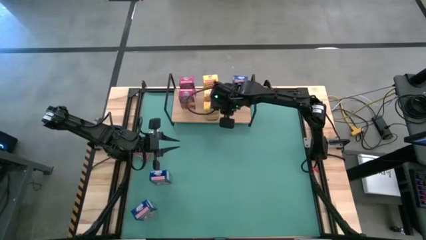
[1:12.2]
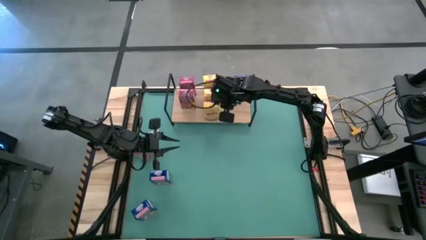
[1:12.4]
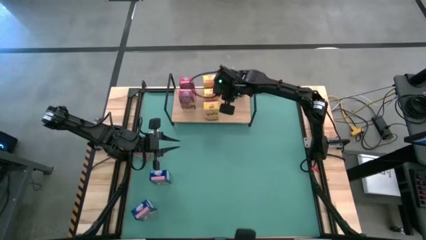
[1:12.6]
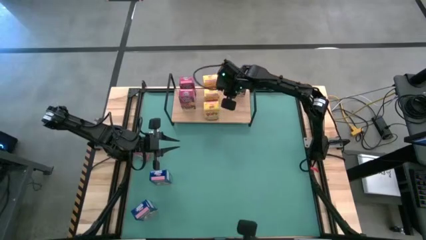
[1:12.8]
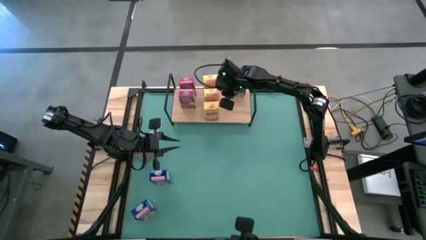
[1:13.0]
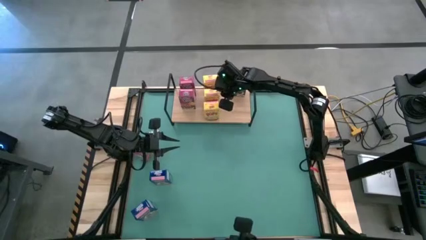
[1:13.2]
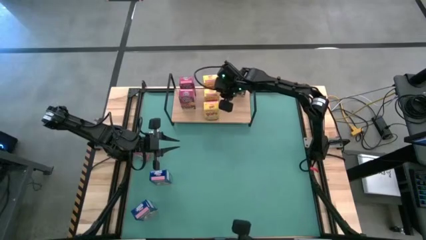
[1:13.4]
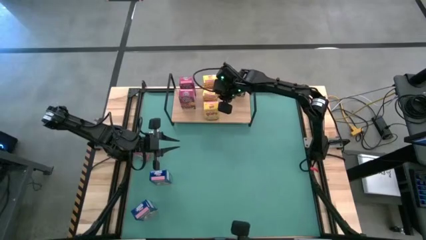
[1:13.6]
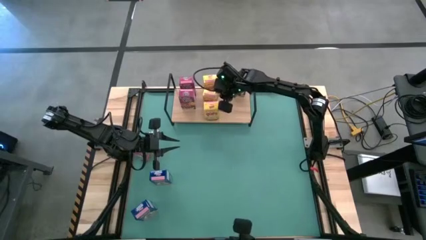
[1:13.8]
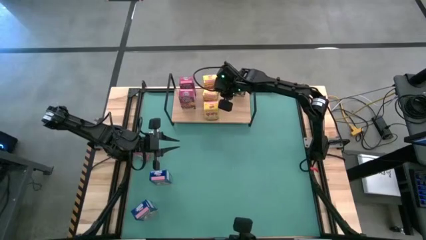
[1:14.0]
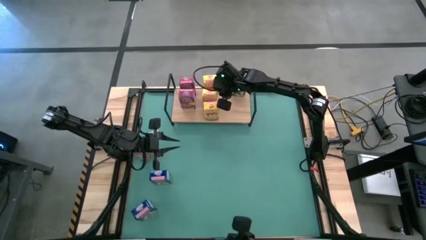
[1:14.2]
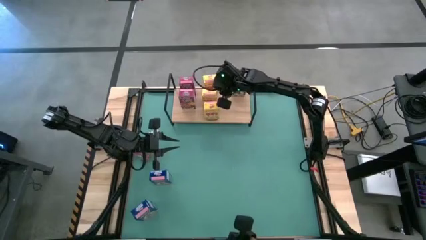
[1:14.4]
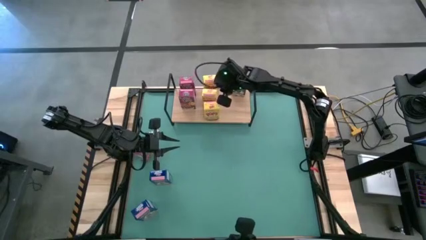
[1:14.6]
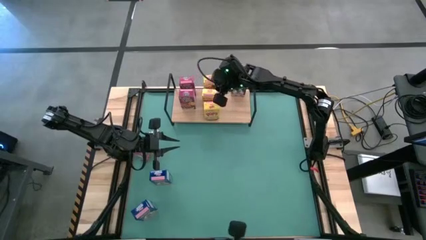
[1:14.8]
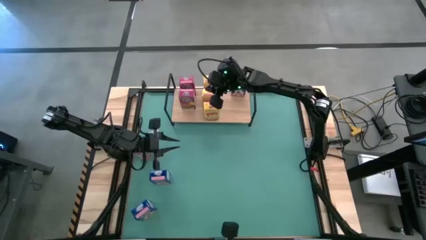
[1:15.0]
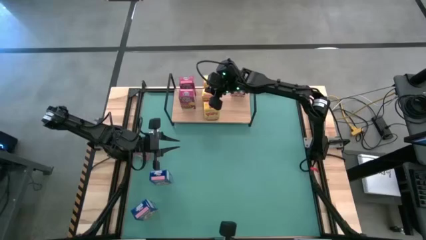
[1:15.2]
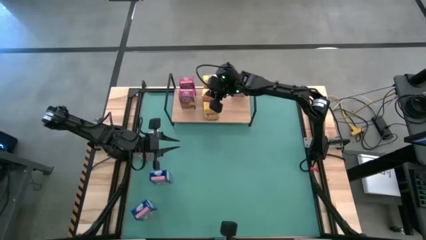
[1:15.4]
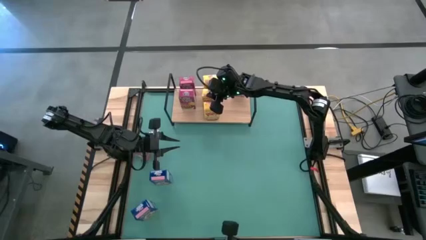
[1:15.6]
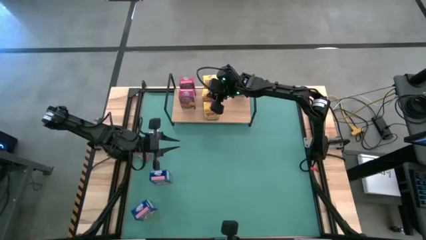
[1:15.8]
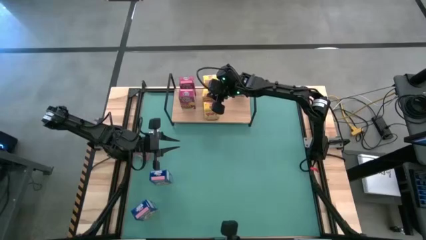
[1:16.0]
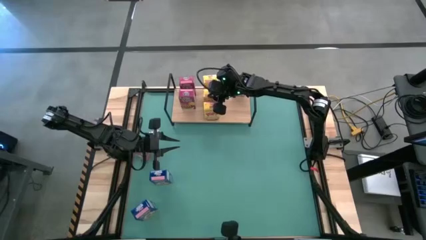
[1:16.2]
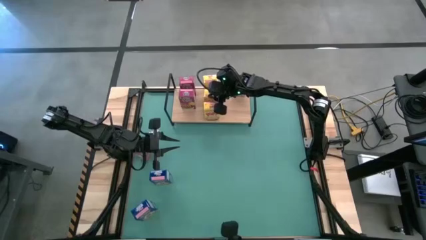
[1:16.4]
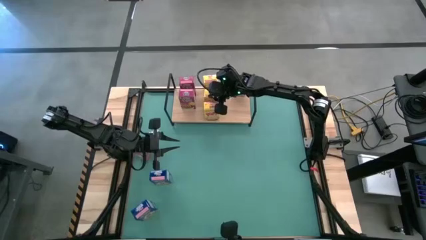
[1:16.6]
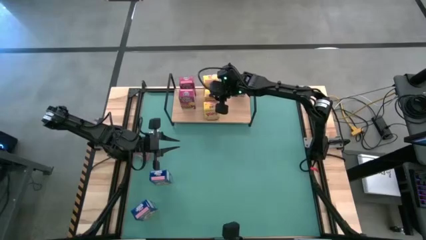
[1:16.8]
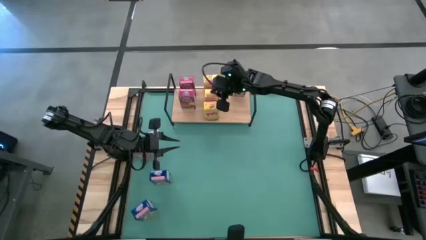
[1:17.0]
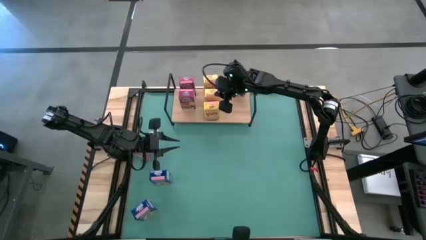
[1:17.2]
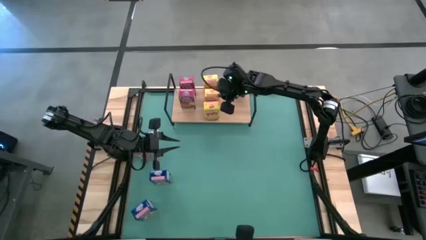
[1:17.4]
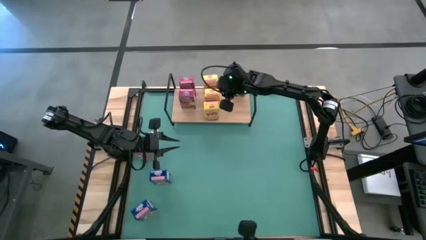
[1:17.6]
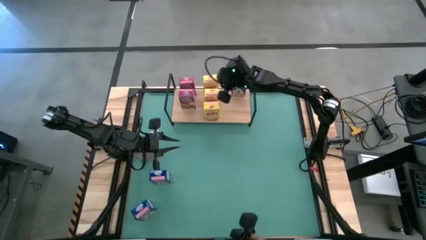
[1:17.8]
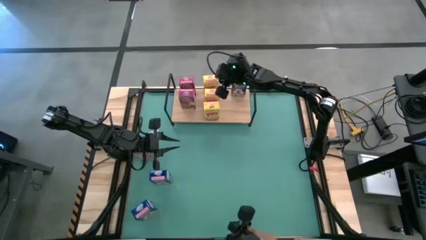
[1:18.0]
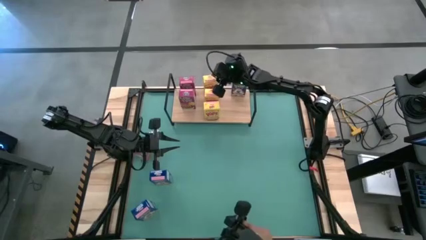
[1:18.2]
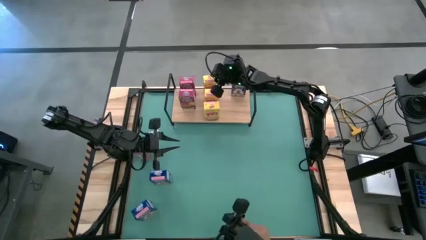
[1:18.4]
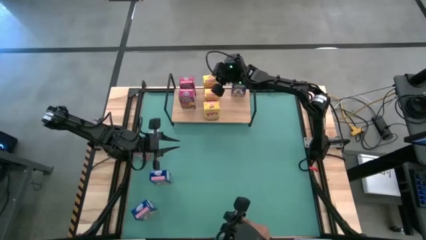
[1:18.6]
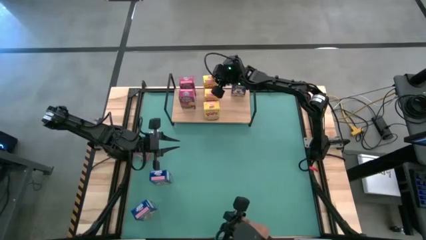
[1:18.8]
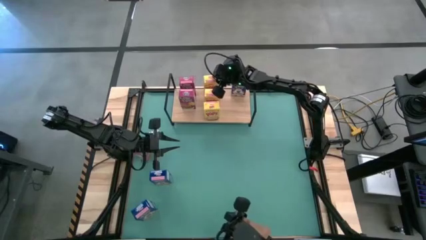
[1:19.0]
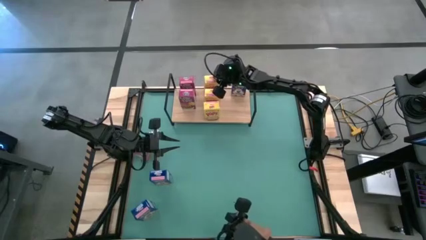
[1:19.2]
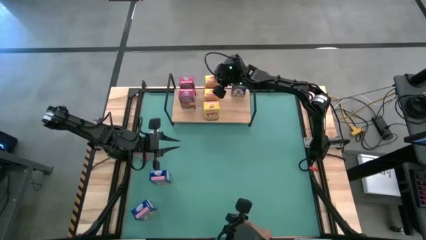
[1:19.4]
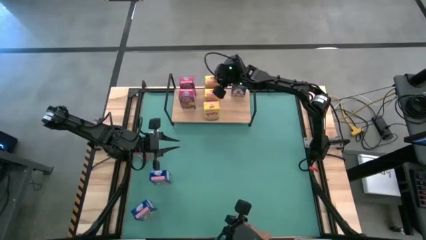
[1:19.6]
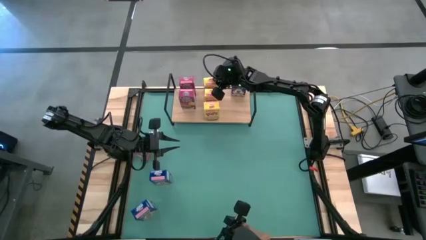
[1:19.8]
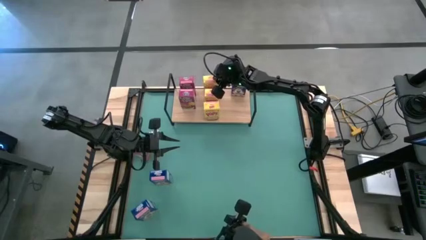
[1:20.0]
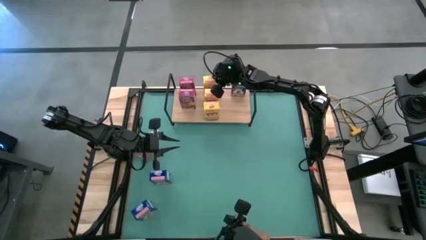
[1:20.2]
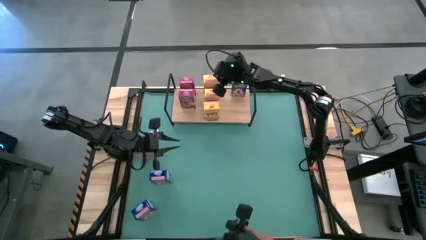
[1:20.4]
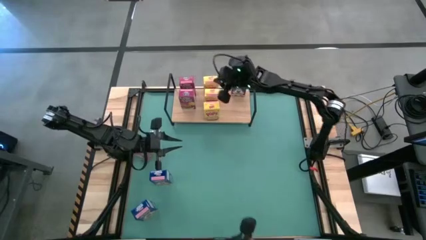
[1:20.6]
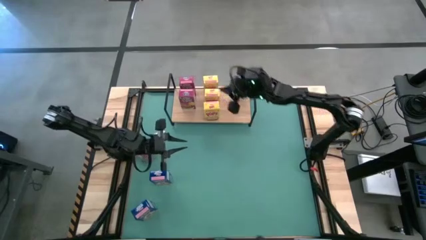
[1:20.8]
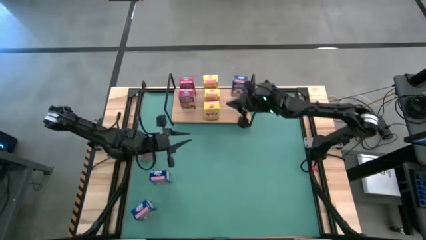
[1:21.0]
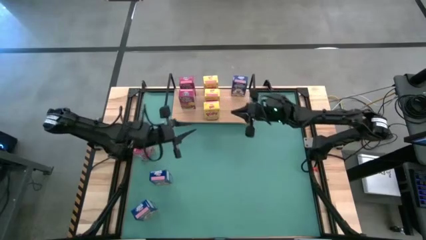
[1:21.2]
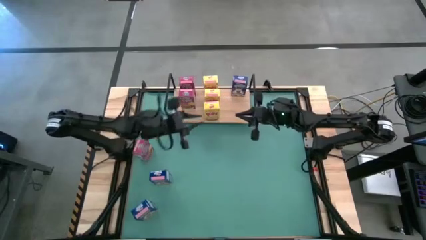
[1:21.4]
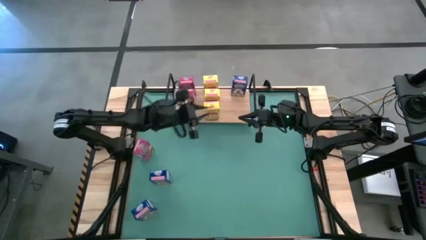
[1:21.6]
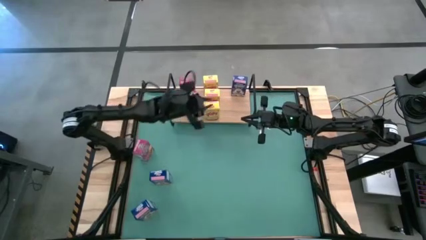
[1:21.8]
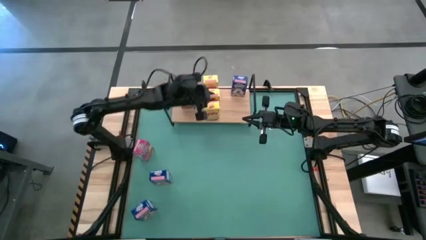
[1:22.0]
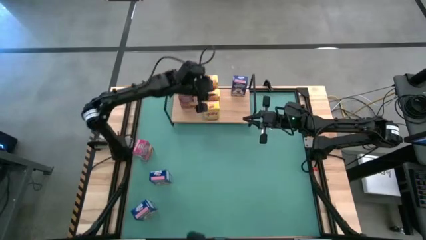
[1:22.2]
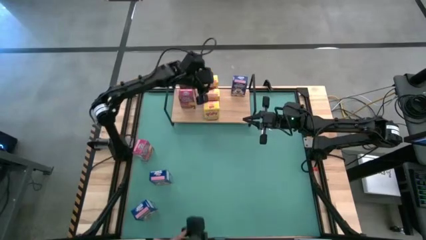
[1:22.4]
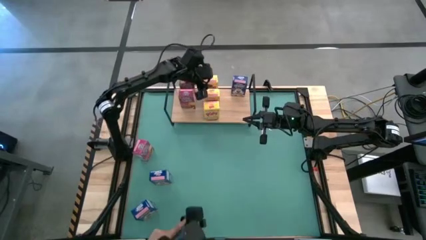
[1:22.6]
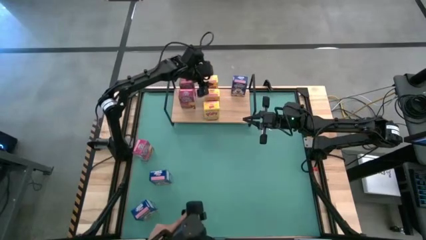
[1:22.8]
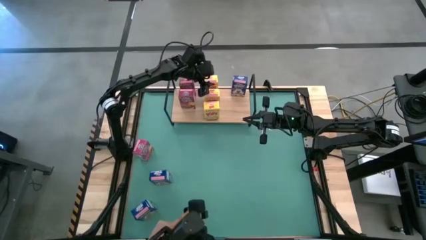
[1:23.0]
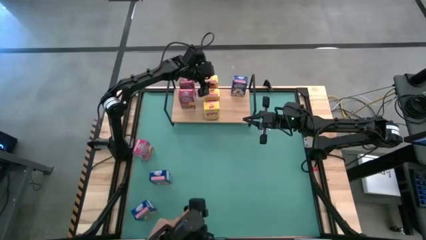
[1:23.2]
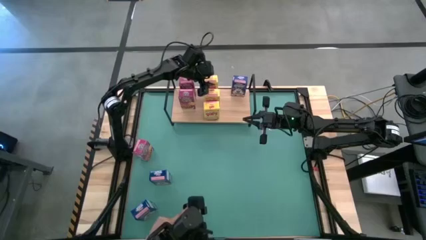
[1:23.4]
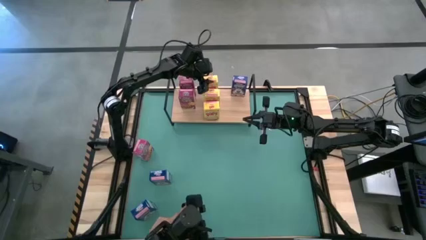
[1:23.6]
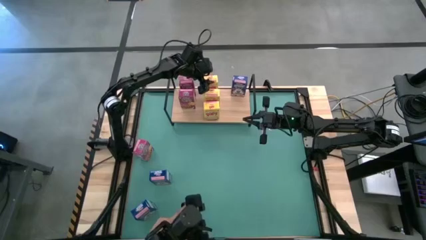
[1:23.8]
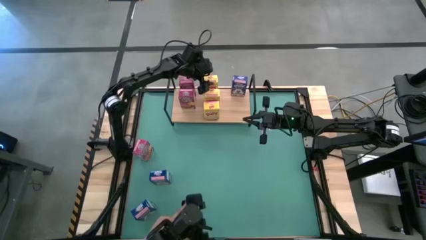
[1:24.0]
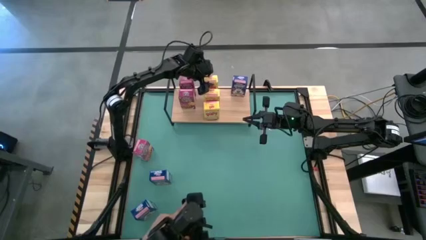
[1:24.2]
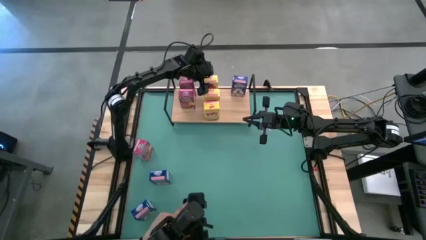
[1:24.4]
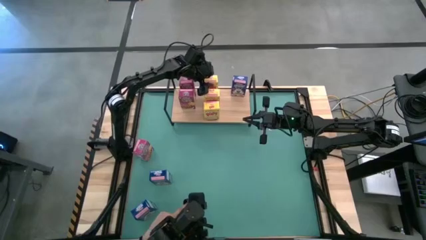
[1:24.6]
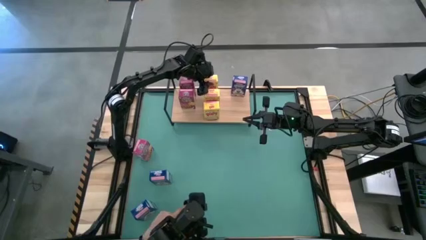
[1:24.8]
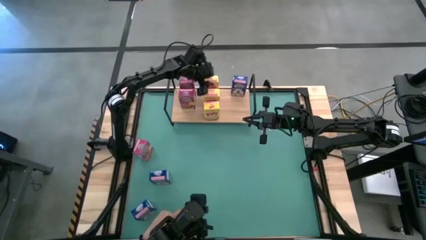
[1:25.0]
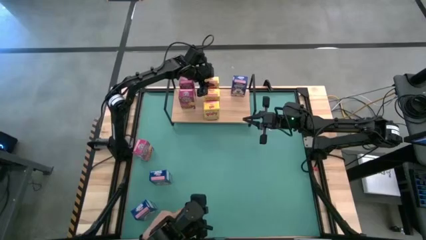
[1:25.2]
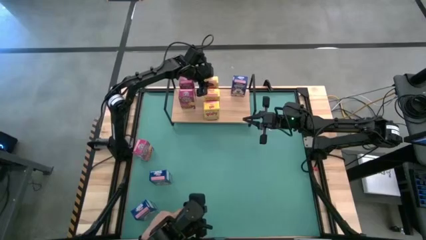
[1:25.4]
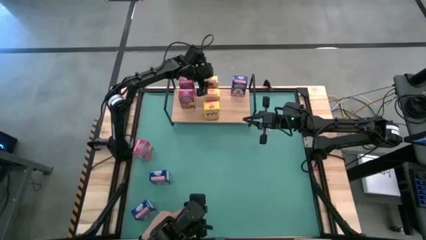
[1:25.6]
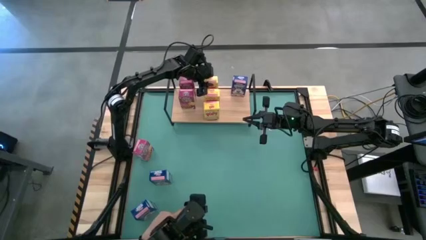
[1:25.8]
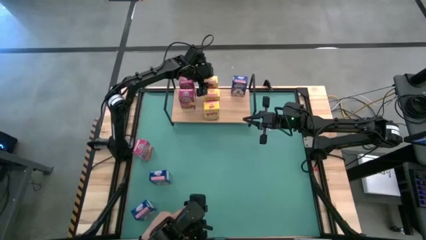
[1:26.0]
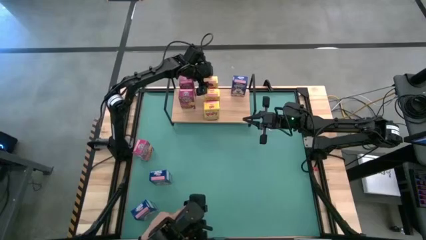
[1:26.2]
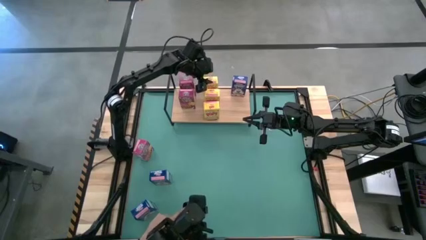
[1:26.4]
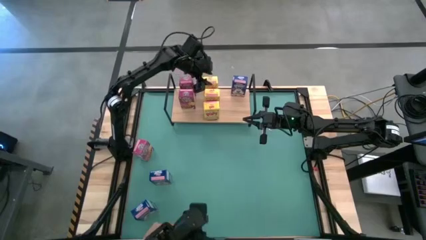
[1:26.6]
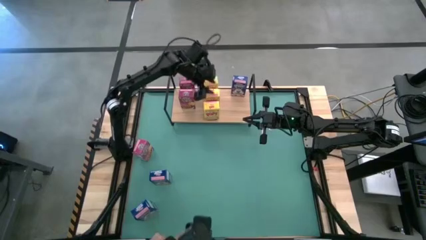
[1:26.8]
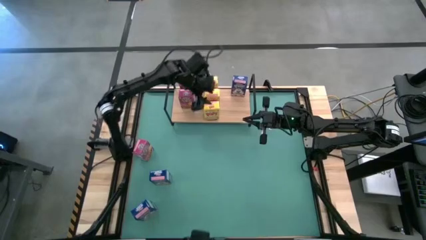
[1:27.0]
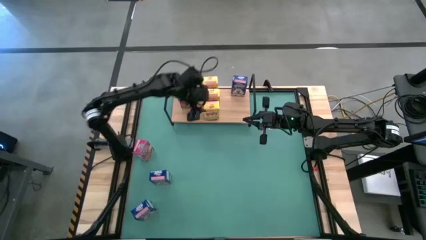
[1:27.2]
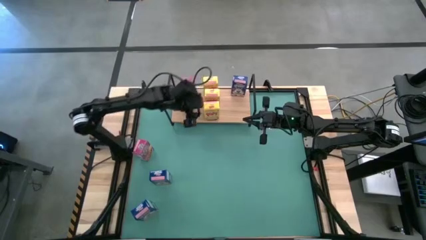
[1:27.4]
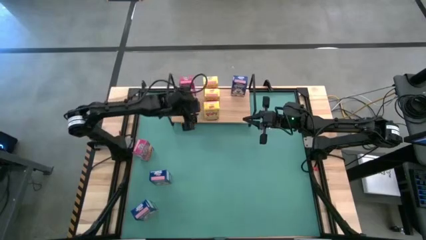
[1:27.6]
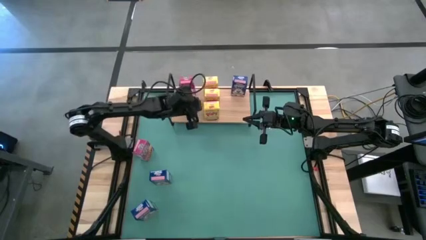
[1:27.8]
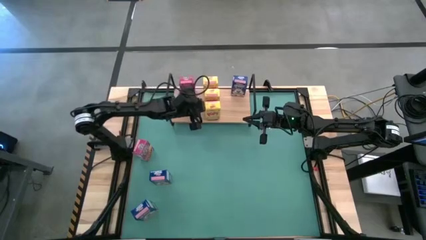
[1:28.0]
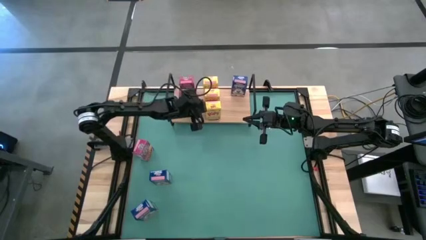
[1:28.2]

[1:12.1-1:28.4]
Task: Stack cereal on shelf
Adjust the yellow cereal boxes on the shelf
